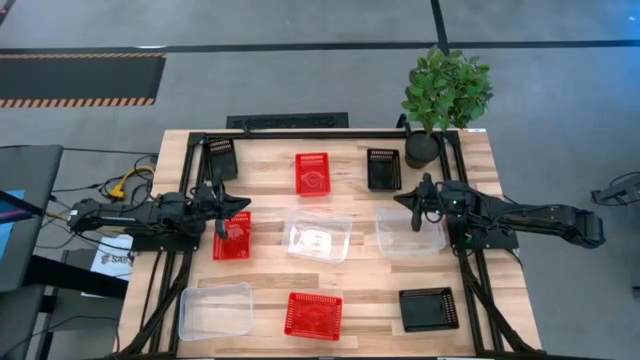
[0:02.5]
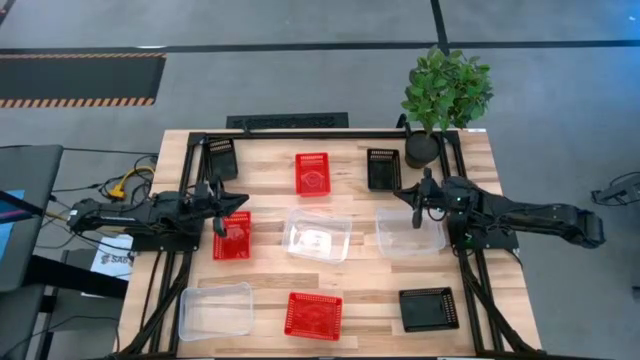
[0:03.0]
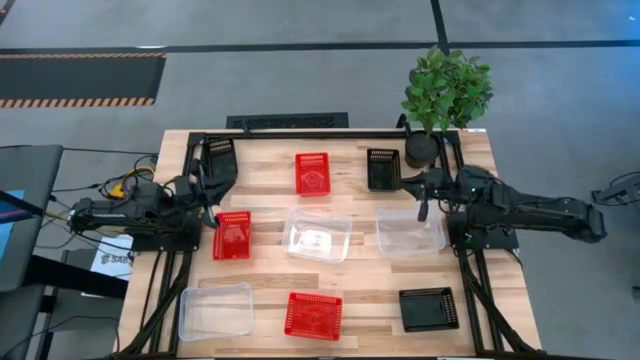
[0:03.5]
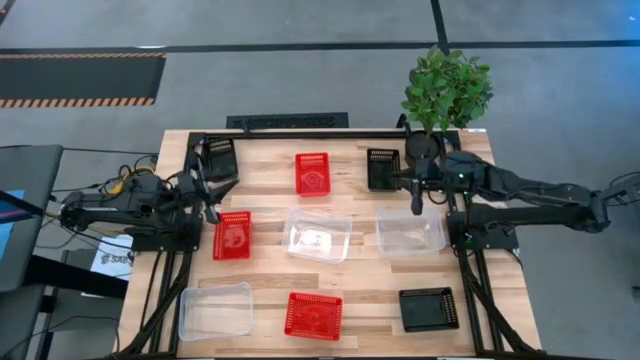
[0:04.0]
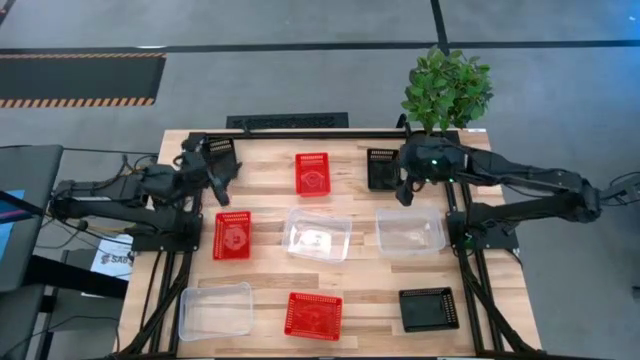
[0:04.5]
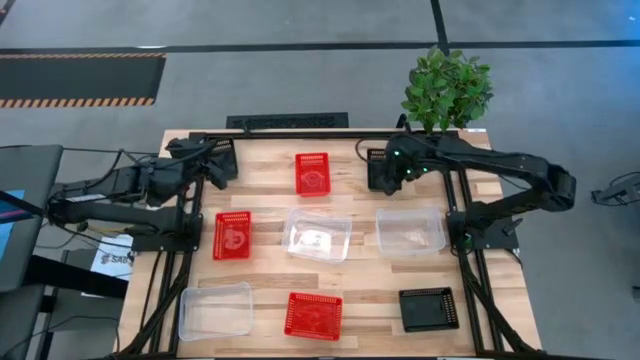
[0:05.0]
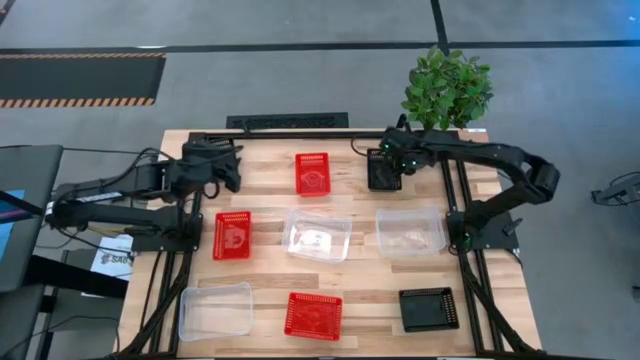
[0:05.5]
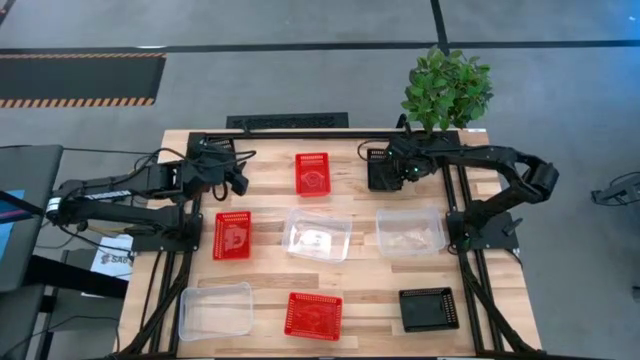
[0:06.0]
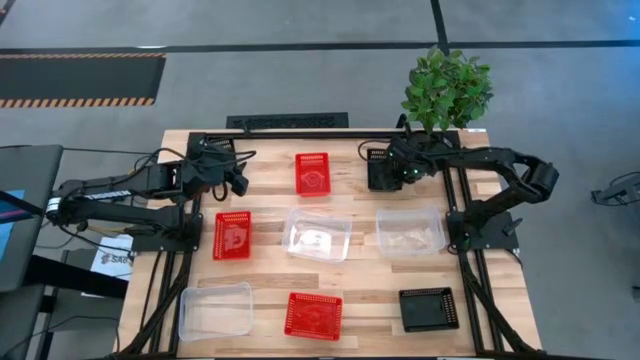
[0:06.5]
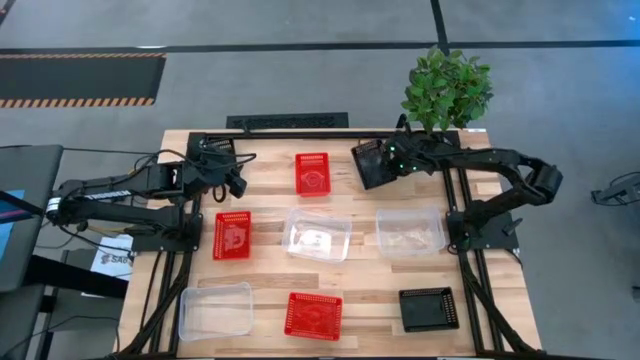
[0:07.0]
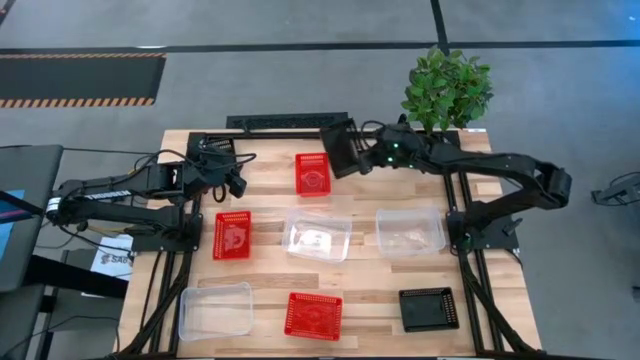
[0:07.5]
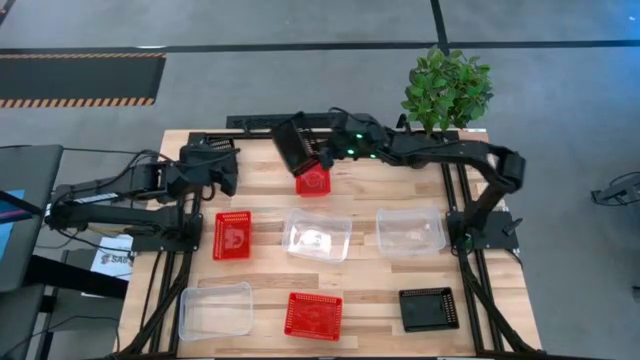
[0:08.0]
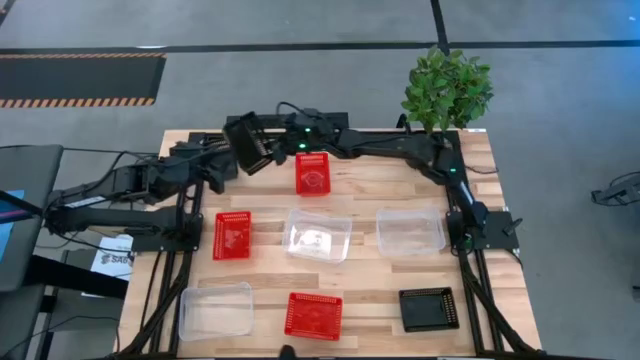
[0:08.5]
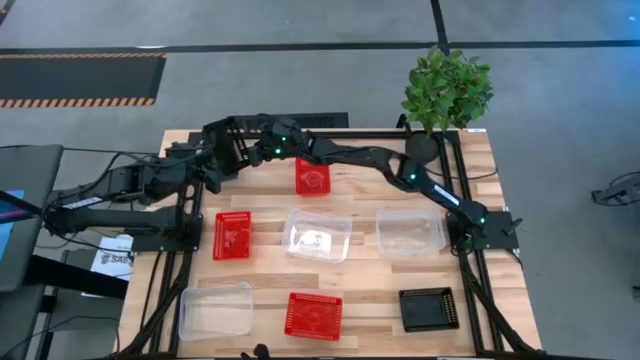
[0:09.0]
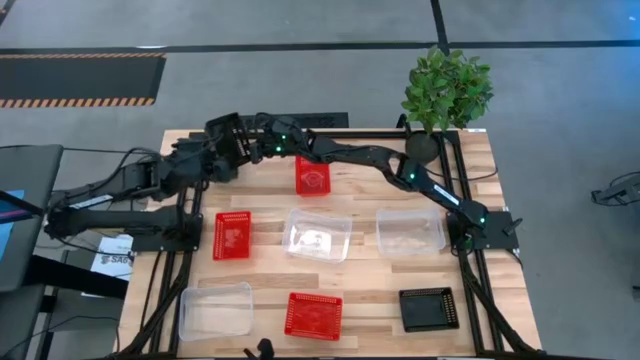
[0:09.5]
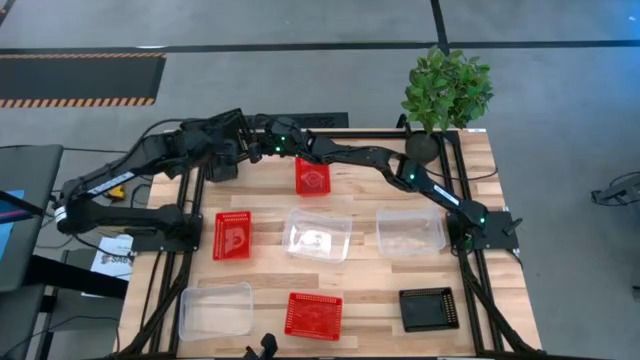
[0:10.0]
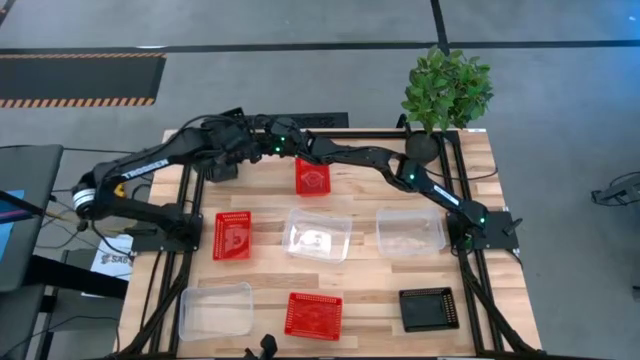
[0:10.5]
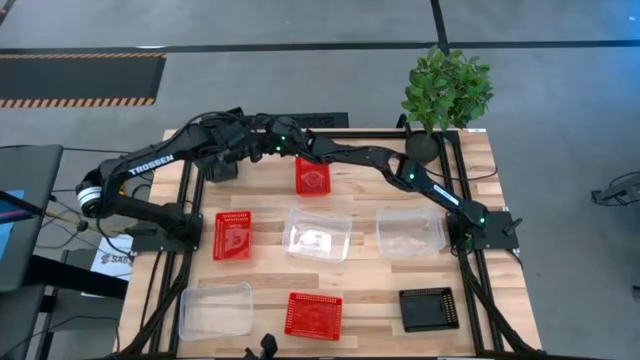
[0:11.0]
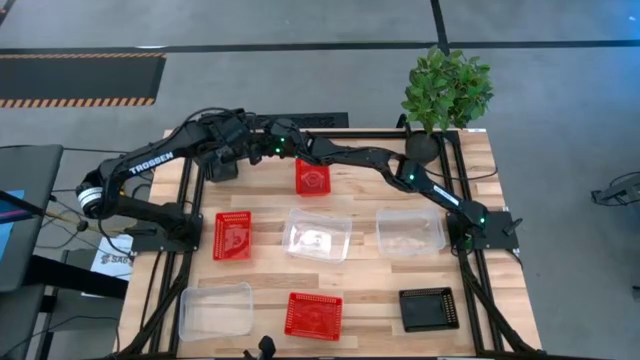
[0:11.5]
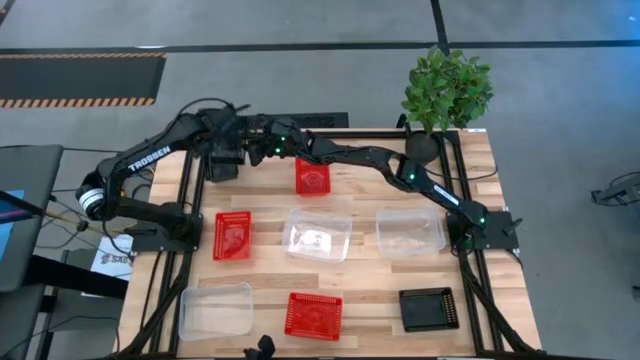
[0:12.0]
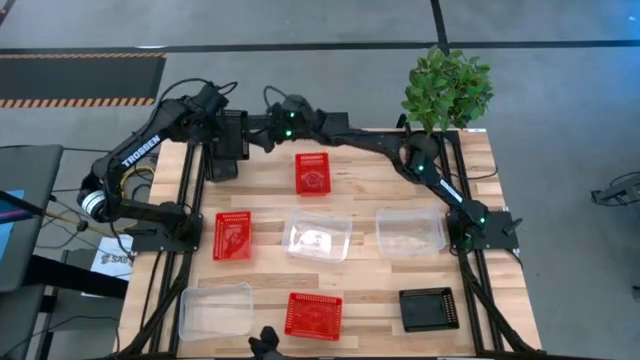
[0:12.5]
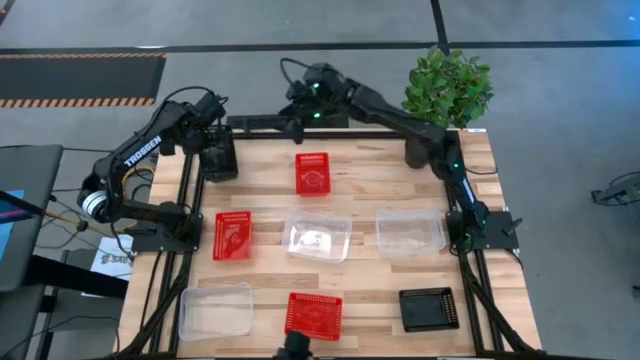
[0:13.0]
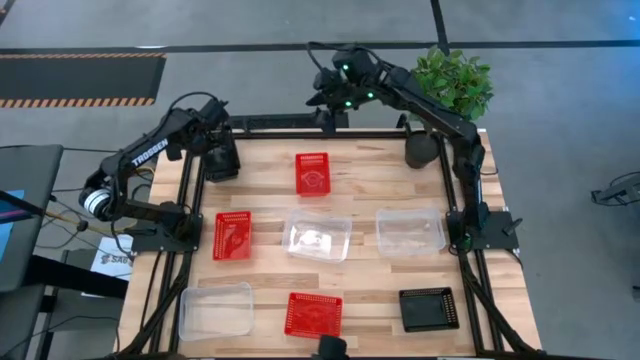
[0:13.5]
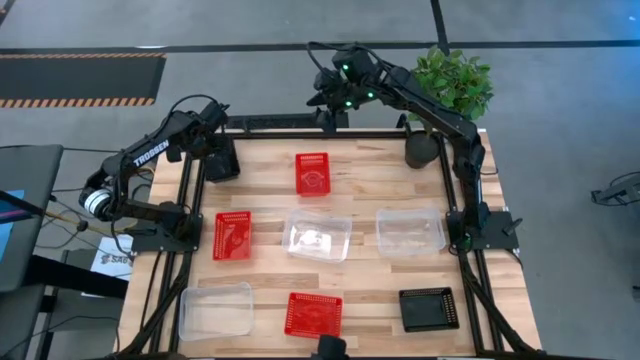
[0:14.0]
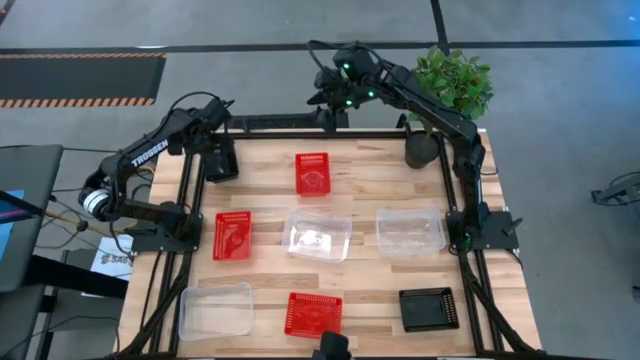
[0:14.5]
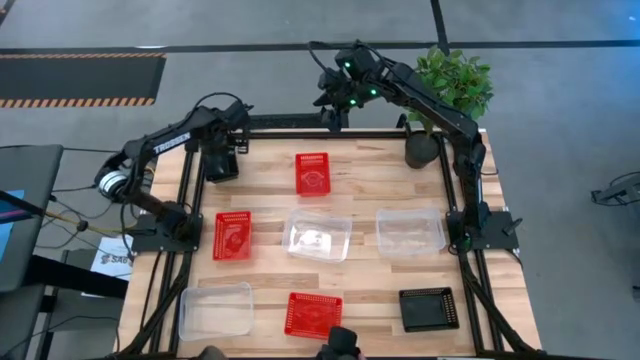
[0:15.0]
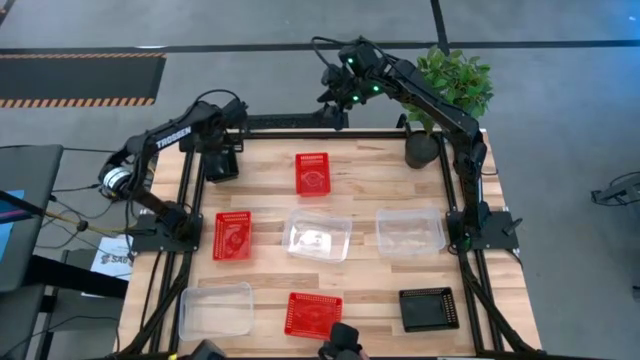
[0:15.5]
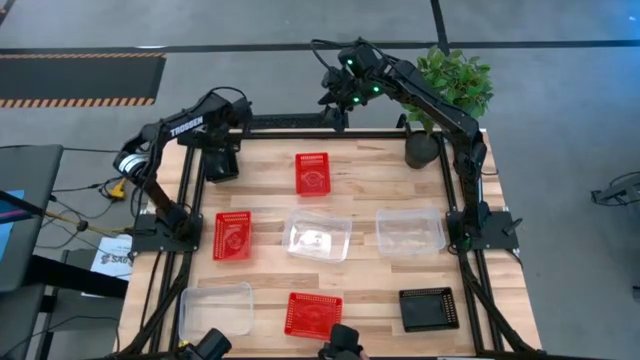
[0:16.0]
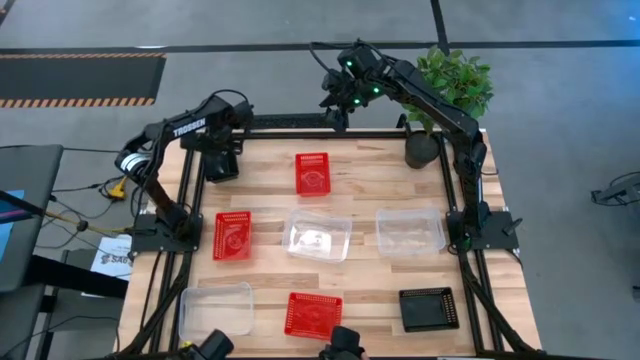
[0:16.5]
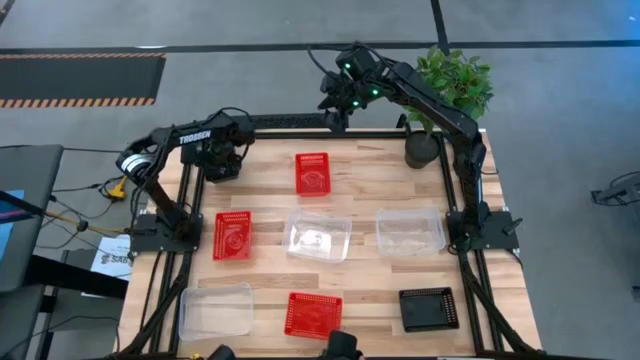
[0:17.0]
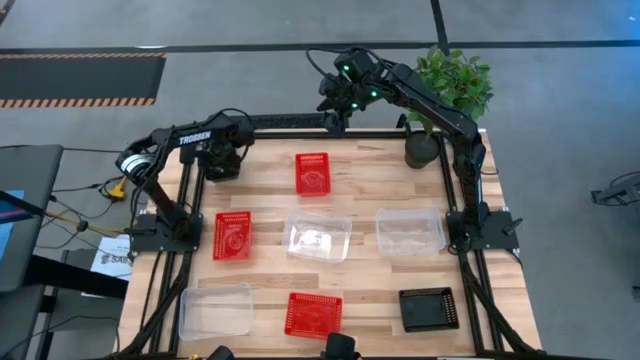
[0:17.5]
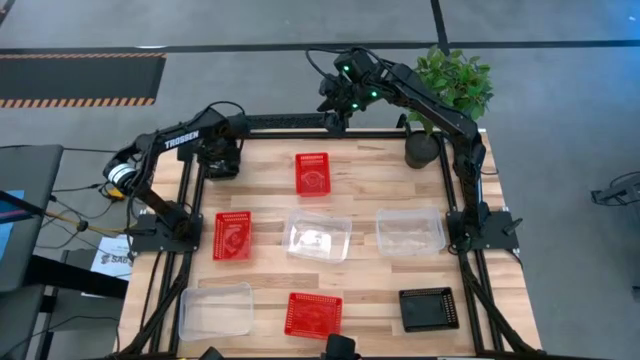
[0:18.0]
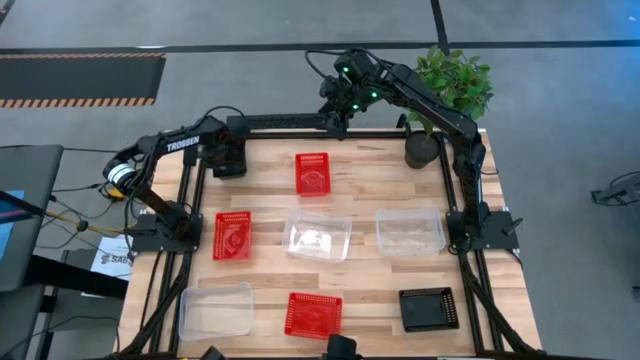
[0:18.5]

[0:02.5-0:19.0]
Stack the top right black bin on top of the top left black bin
